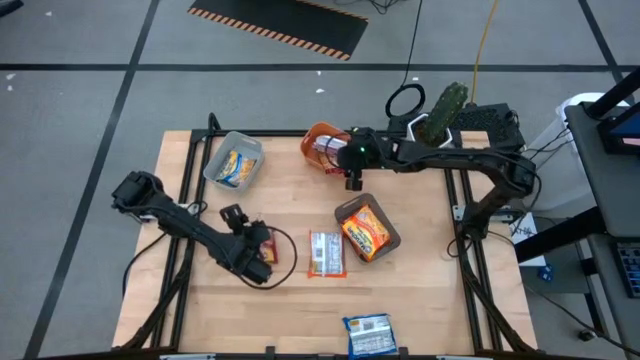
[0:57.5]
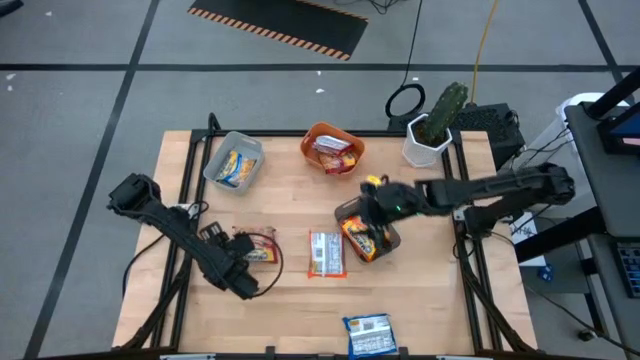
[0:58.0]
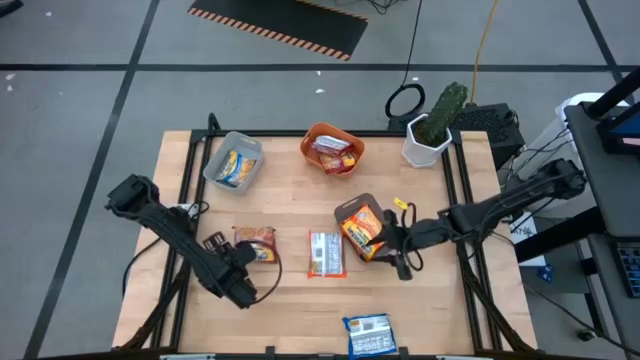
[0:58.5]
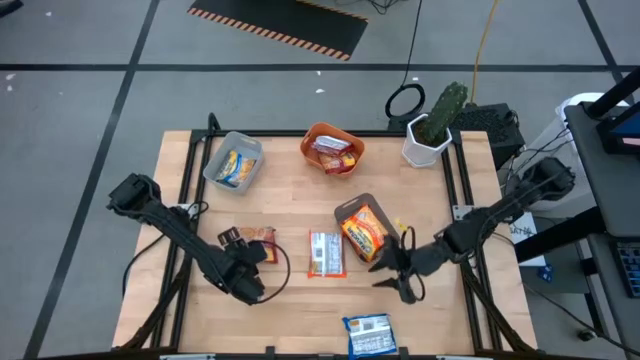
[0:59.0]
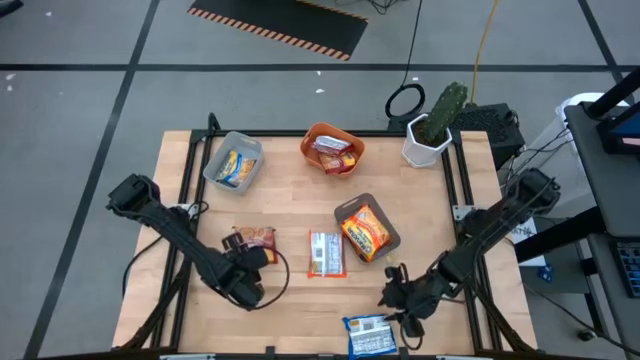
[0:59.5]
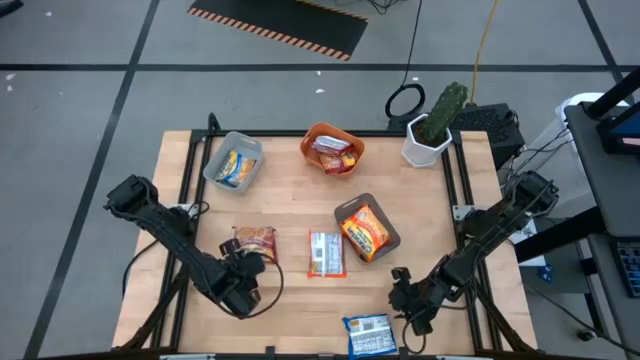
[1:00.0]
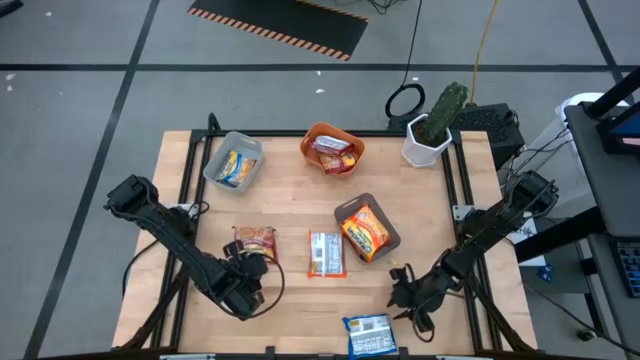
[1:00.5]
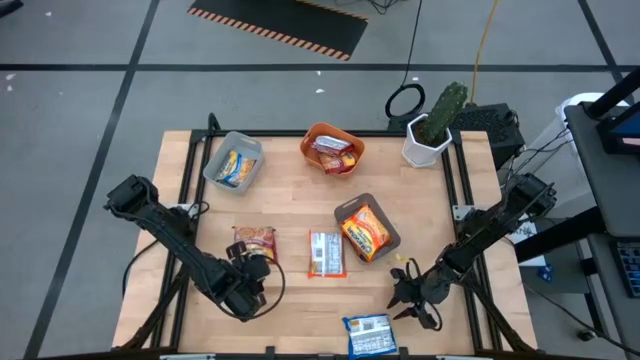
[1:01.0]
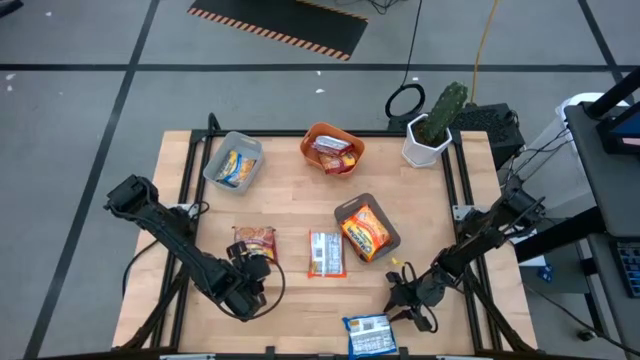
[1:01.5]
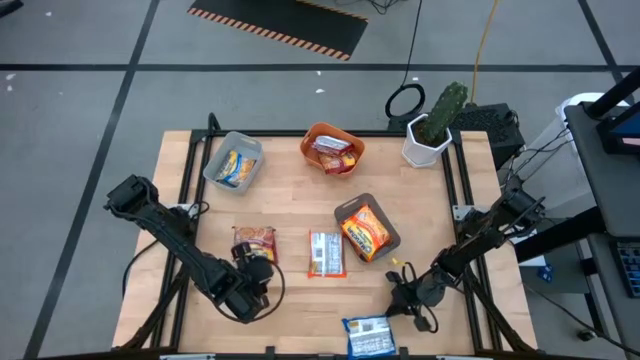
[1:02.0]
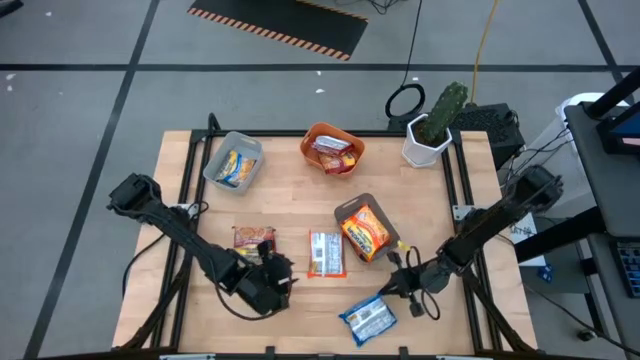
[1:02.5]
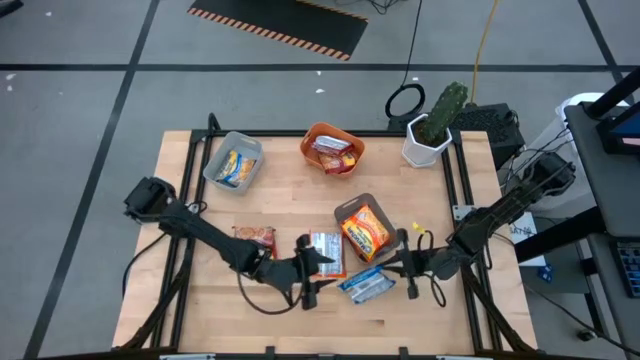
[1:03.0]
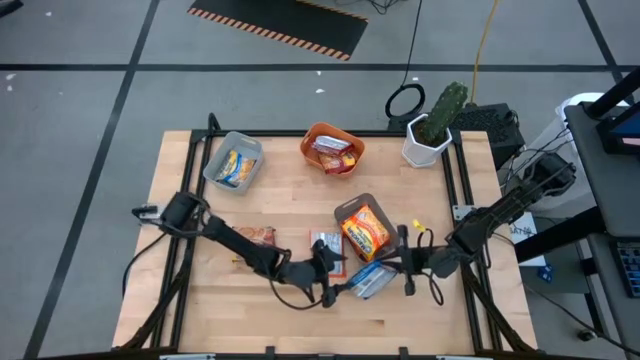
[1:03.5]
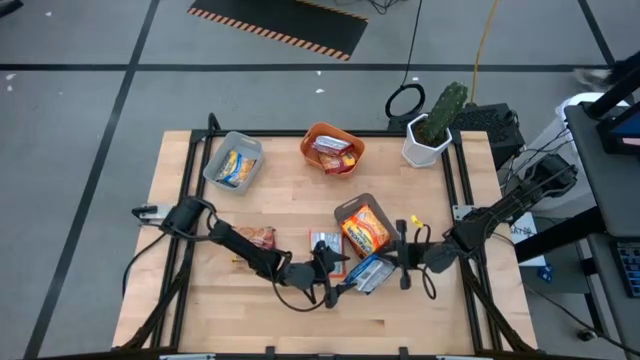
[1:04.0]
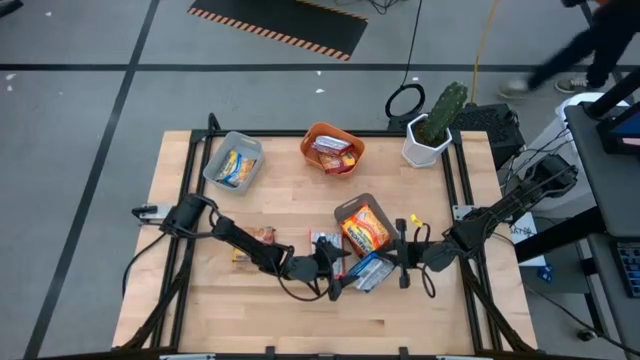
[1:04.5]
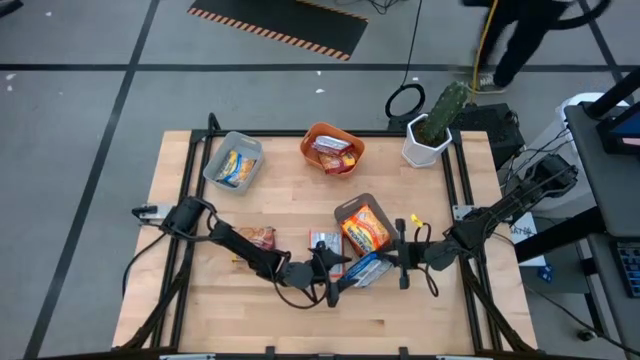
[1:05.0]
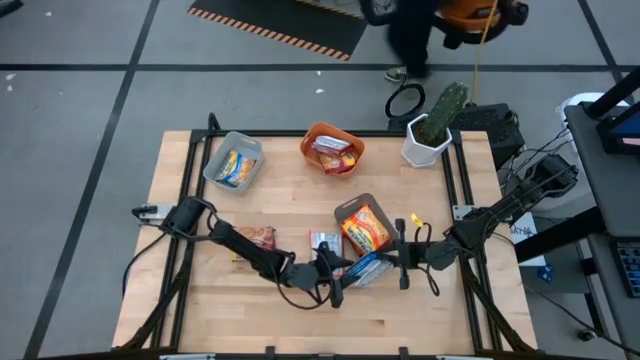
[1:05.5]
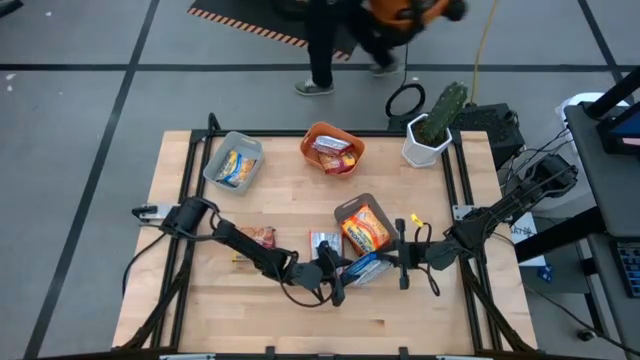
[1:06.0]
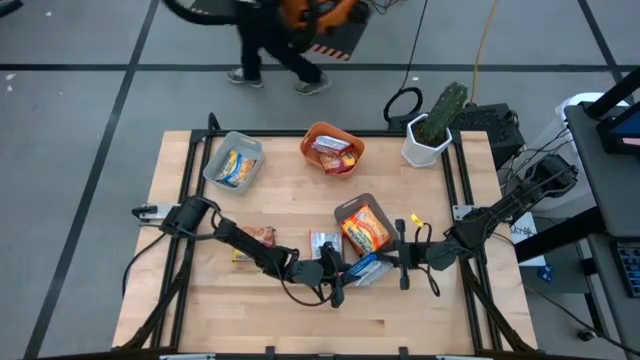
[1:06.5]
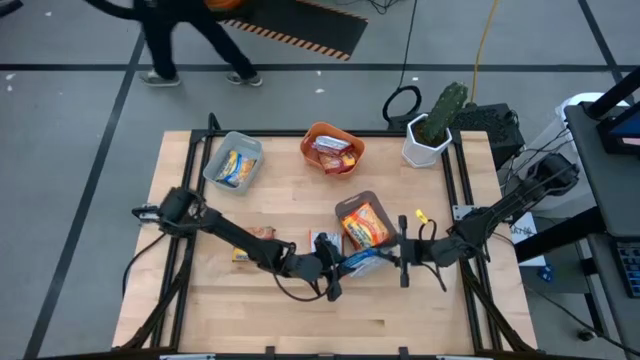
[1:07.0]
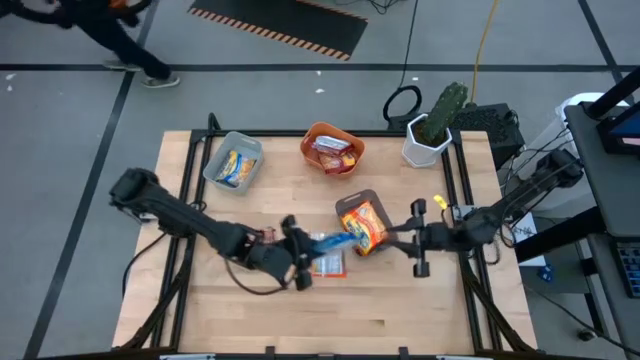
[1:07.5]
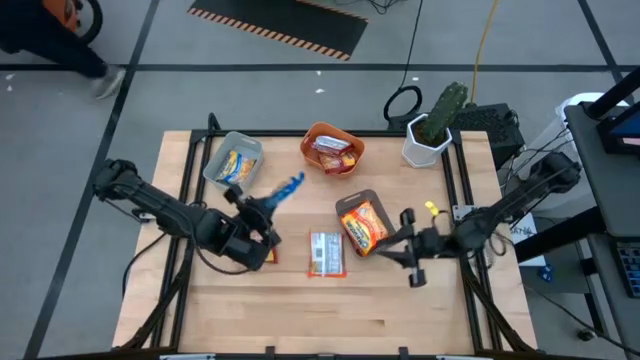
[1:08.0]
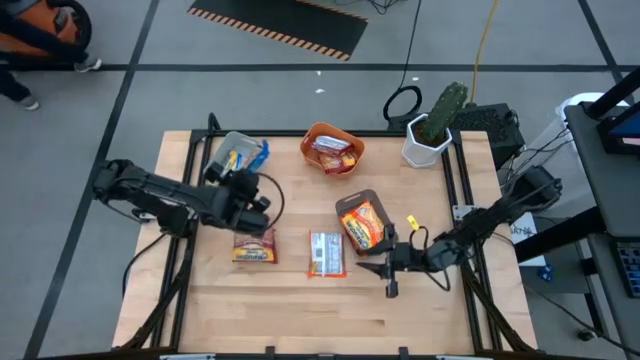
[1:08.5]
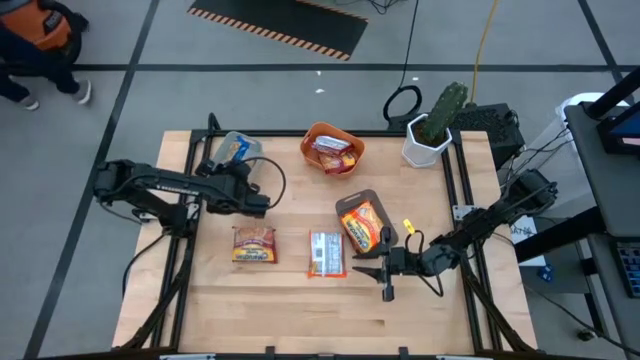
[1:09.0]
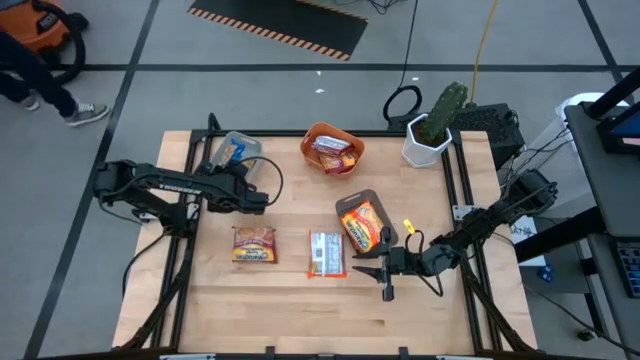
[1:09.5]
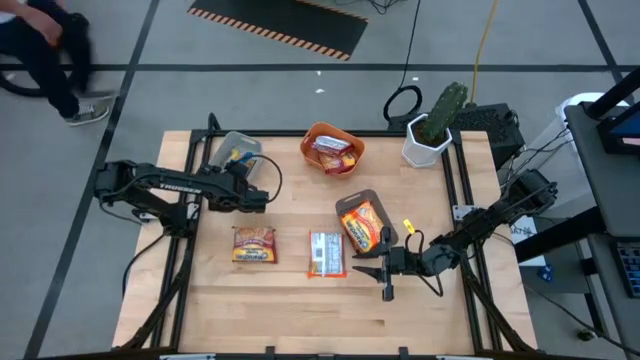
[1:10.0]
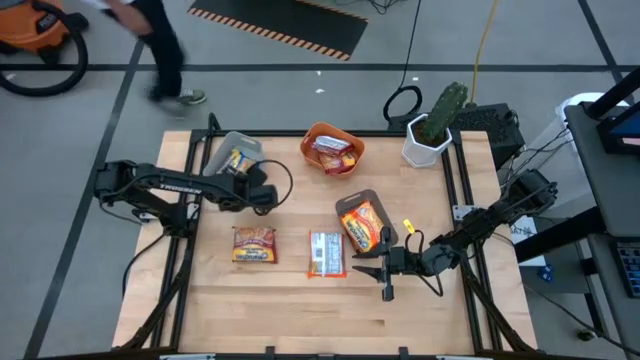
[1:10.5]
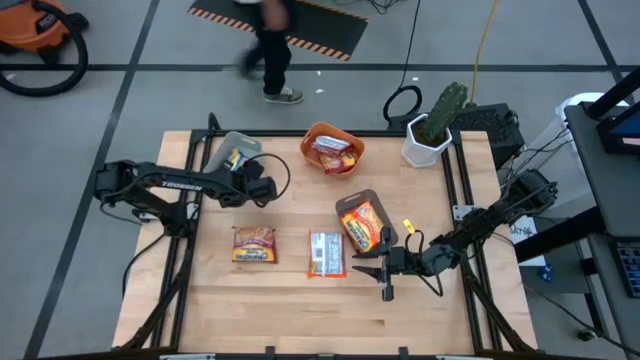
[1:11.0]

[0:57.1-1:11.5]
Task: Sort Maruchan noodles
Put the blue noodle pack into the gray bin

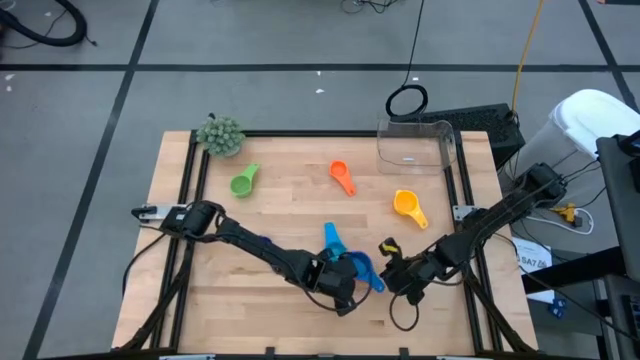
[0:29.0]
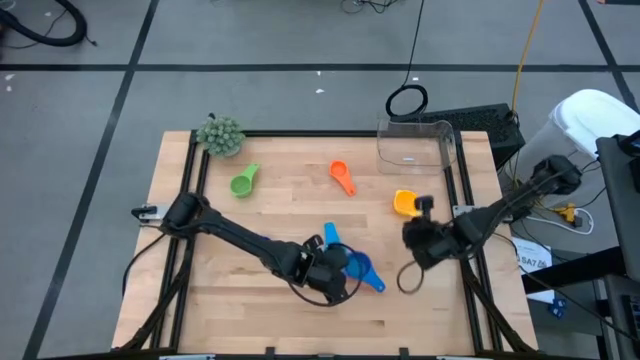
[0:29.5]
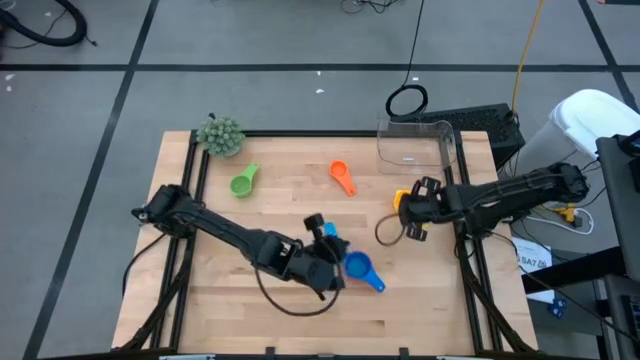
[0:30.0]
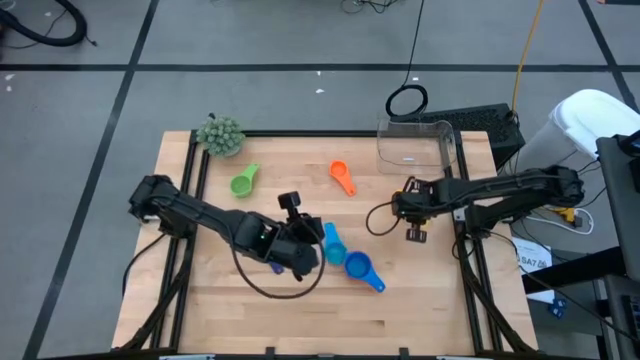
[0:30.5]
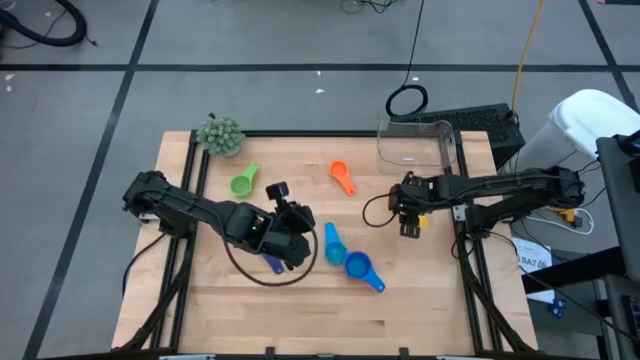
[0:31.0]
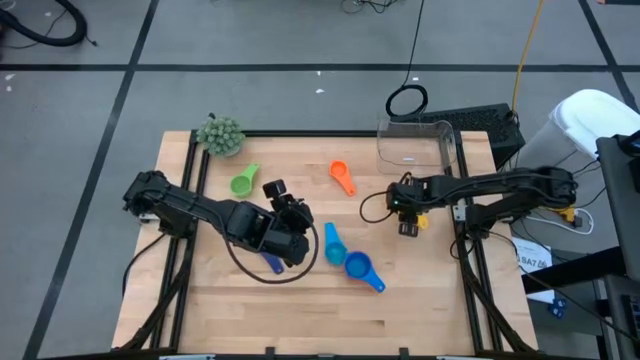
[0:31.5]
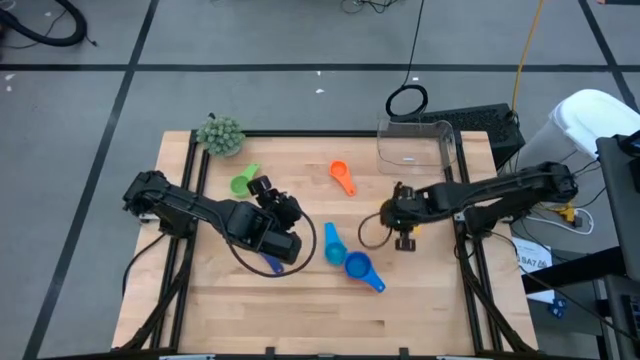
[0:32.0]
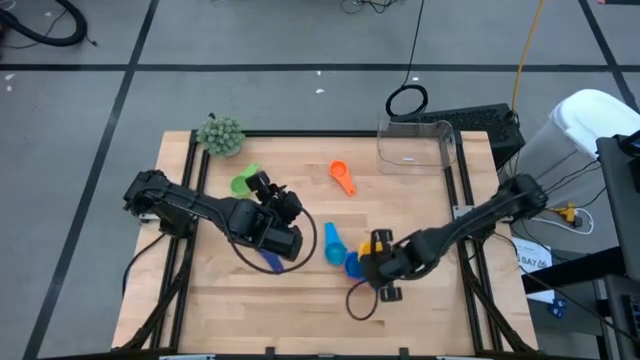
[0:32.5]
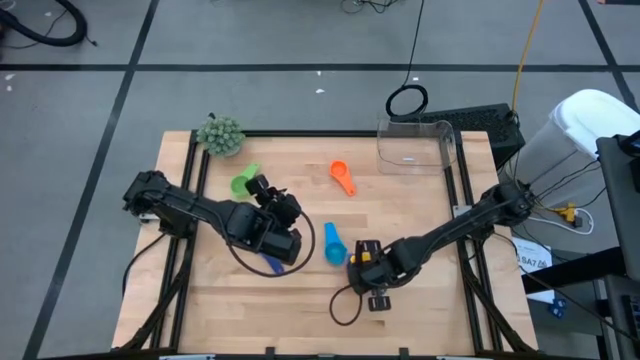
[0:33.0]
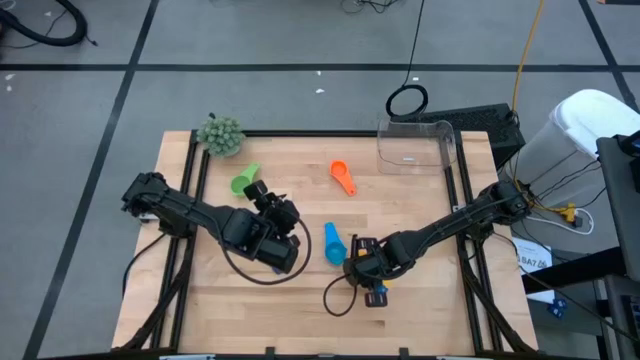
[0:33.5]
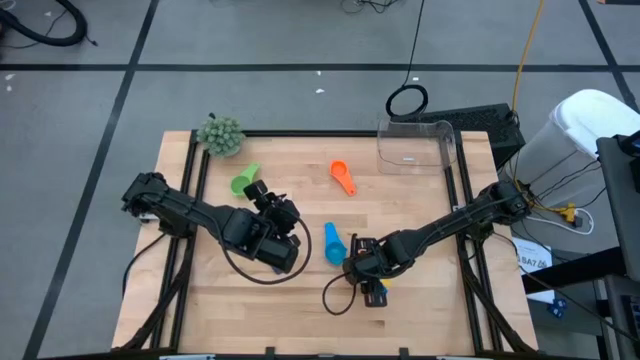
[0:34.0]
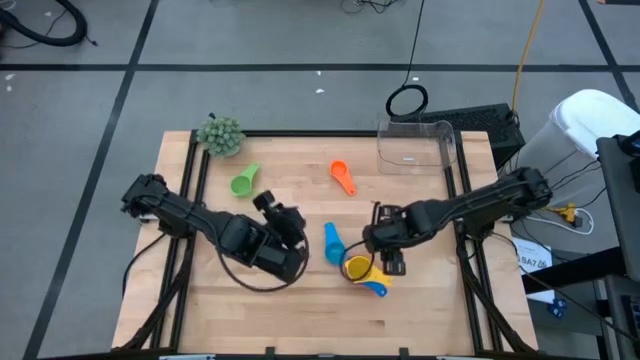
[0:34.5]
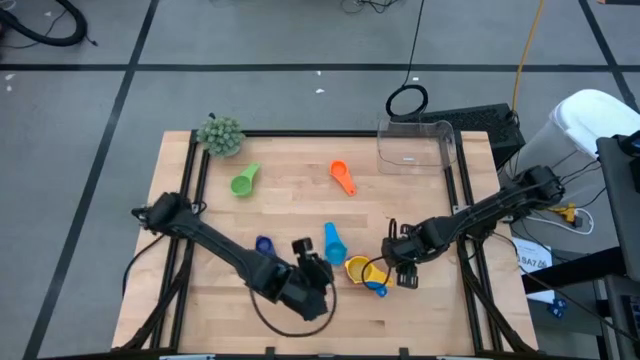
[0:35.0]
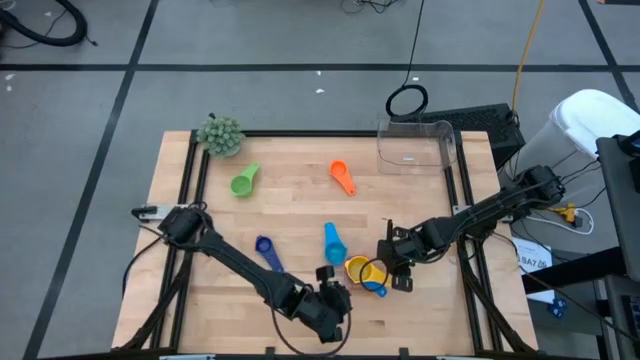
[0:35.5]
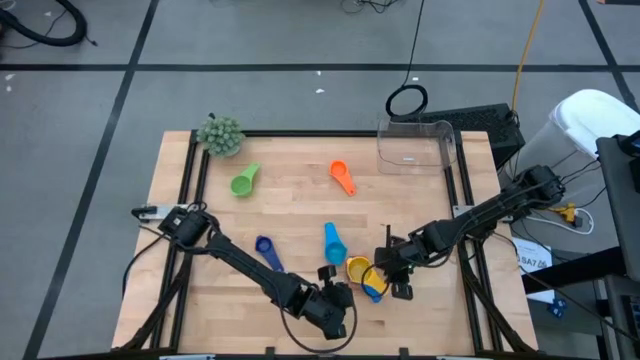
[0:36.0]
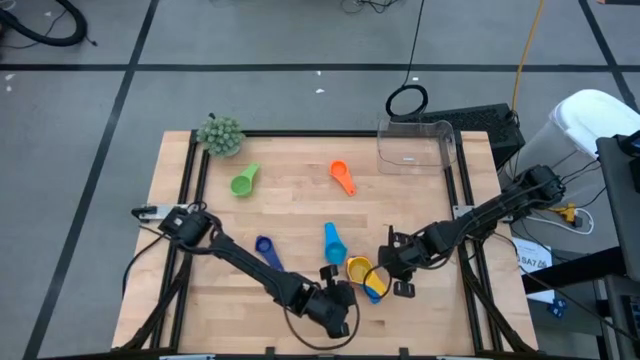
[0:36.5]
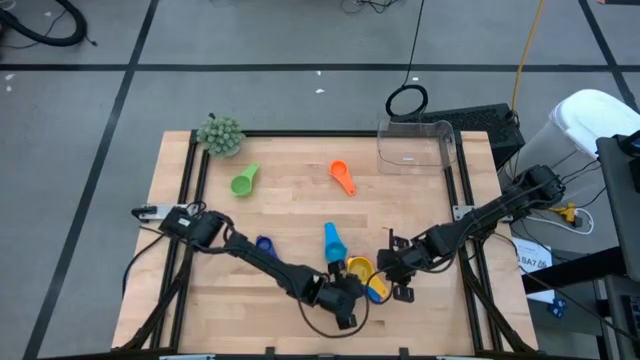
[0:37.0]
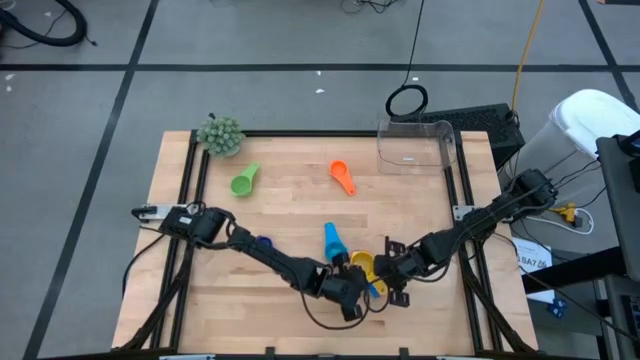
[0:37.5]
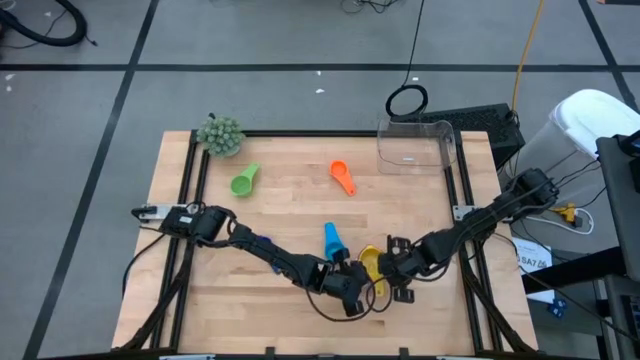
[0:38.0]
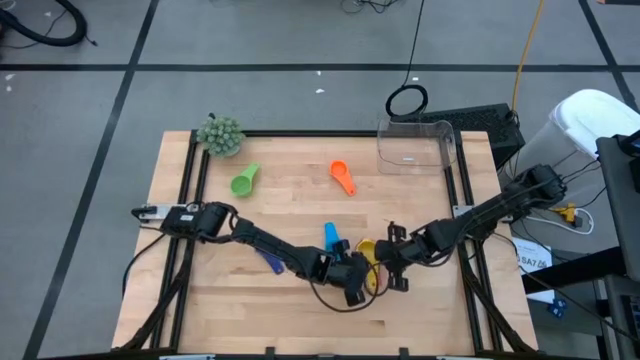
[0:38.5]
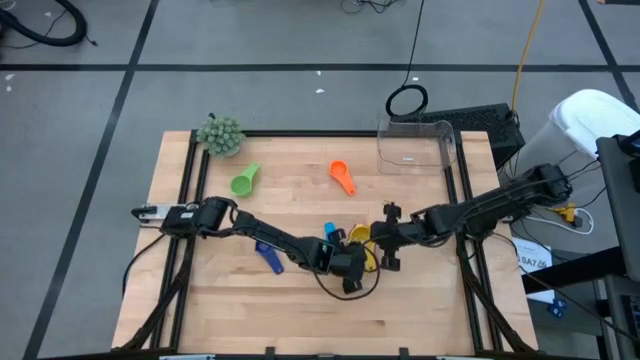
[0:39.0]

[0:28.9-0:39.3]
Task: Nest measuring cups in basket
Stack the yellow measuring cup on top of the blue measuring cup
